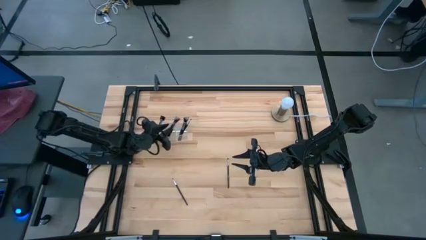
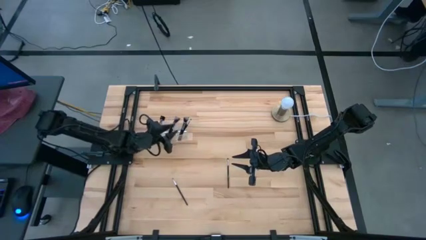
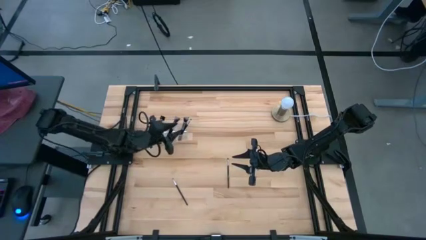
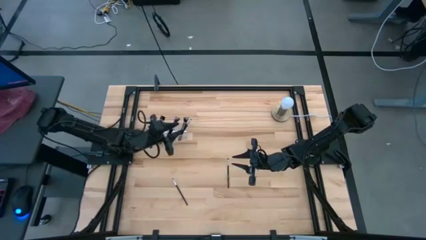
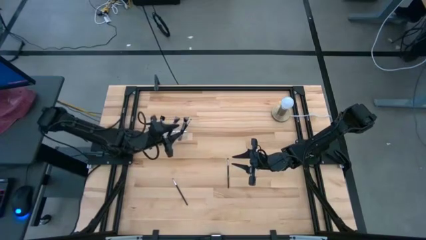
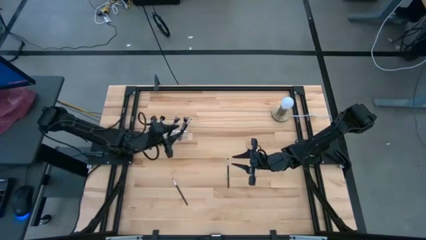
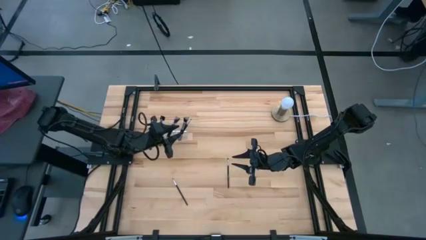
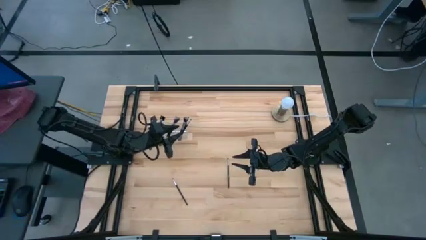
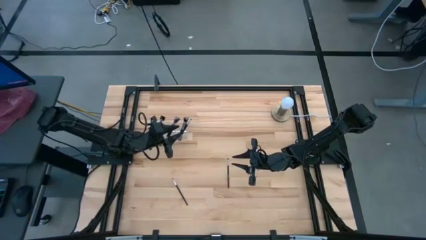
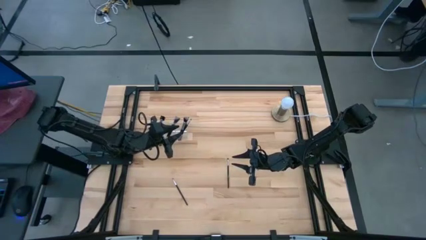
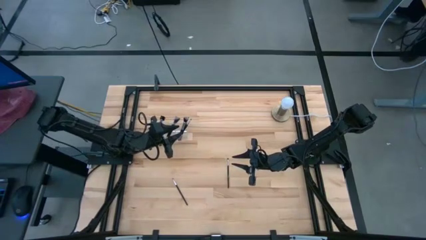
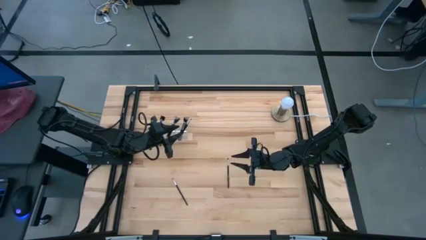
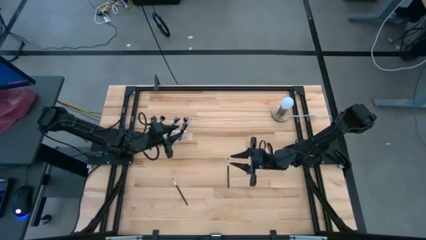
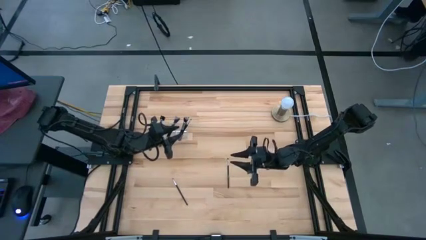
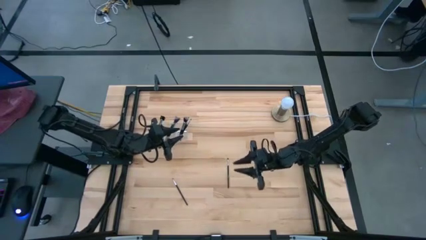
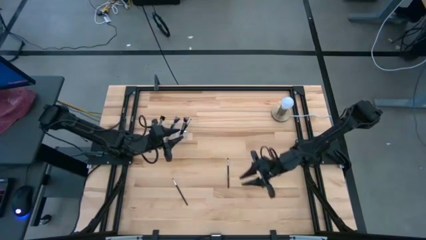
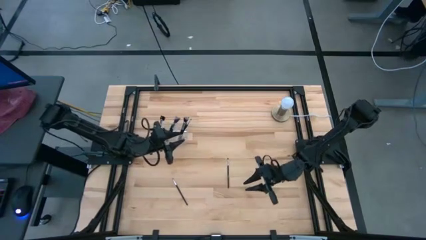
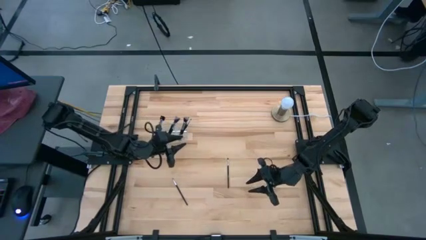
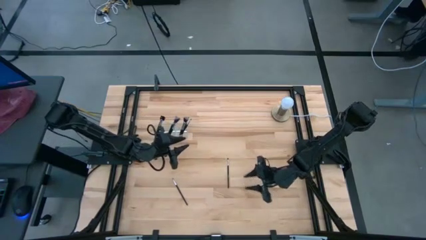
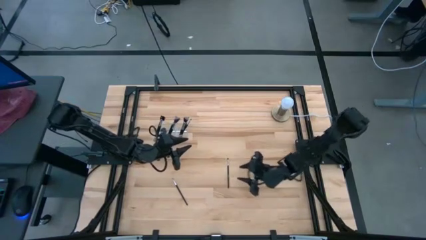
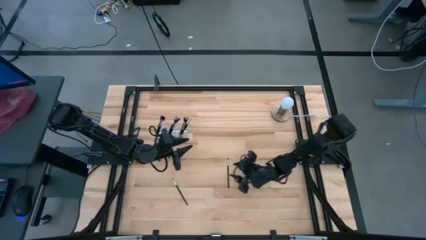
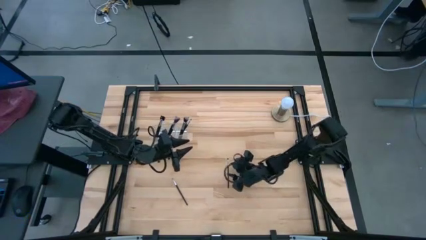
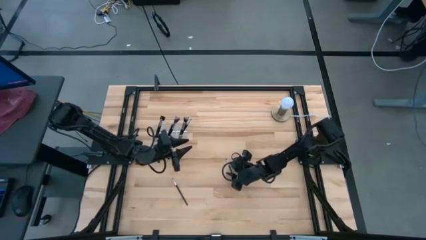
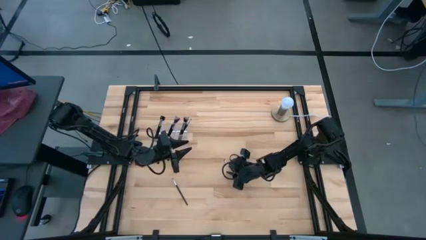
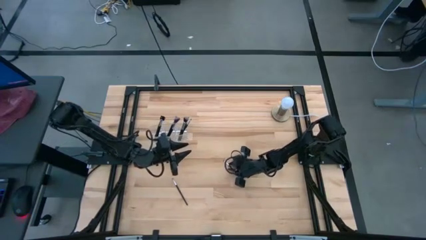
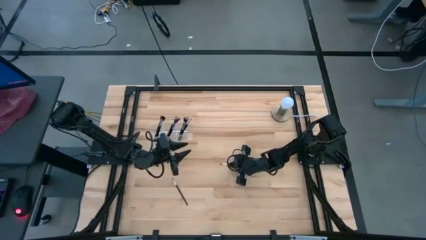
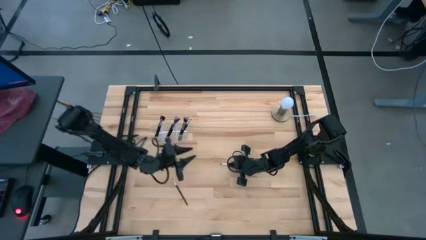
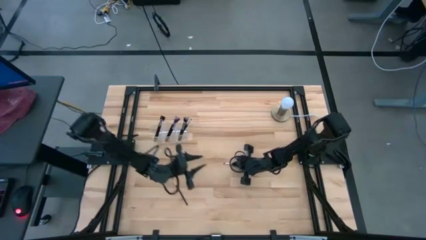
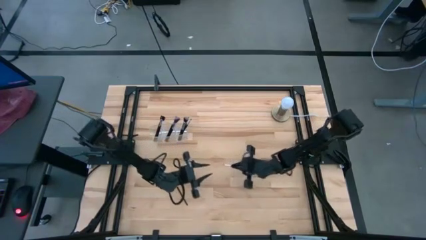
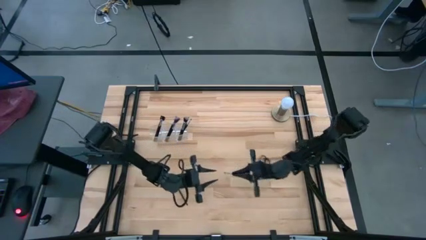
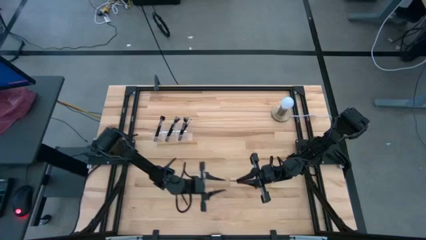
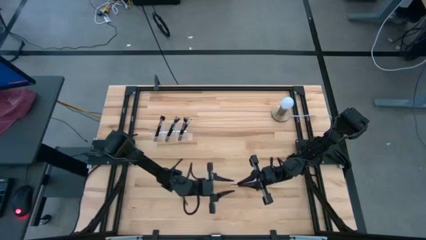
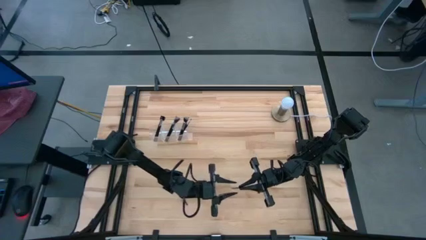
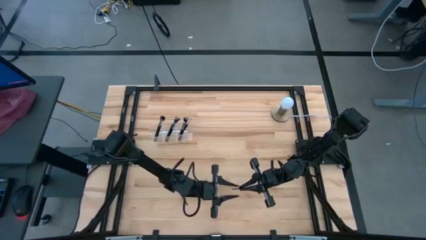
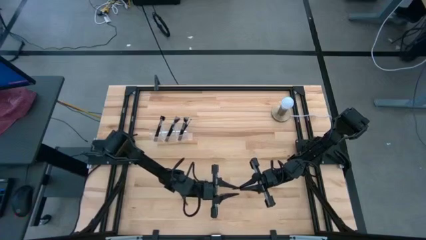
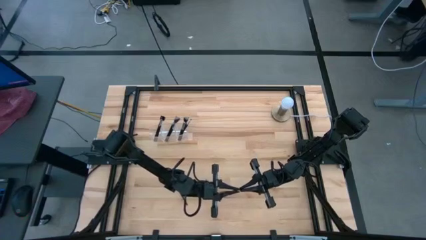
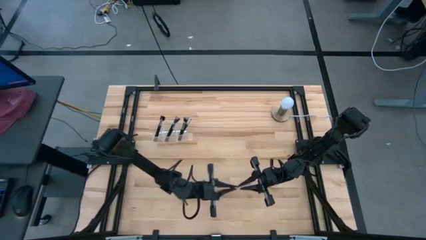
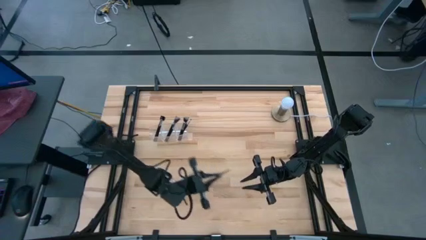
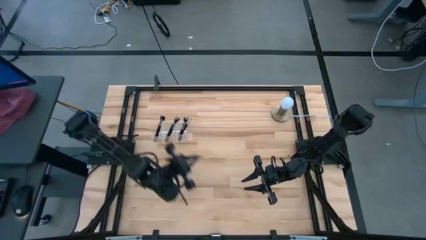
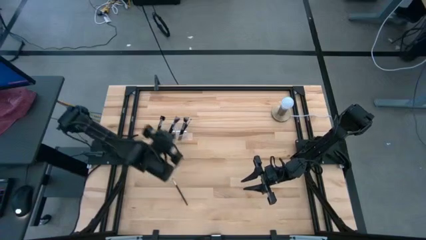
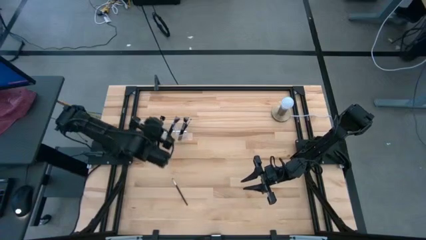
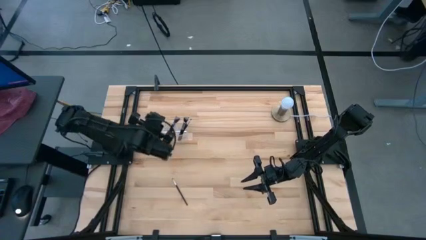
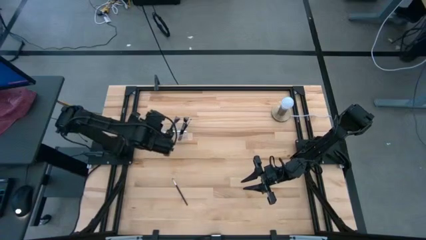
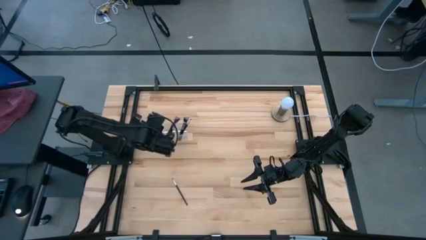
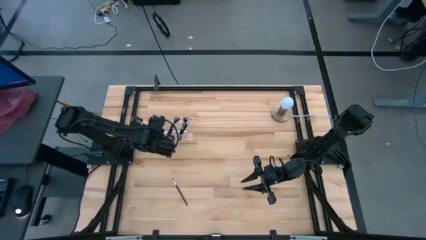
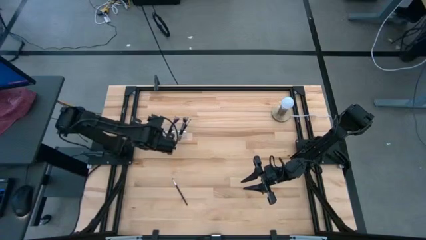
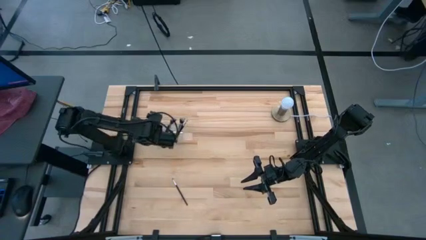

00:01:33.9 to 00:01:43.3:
Task: Pick & Place Makeup Brushes
Put the black eyeshadow brush into the transparent organizer

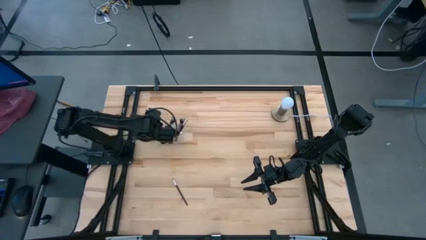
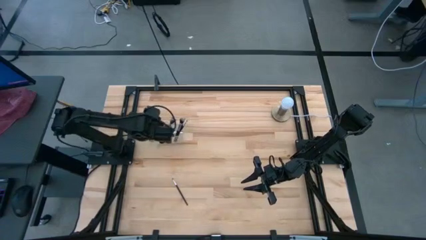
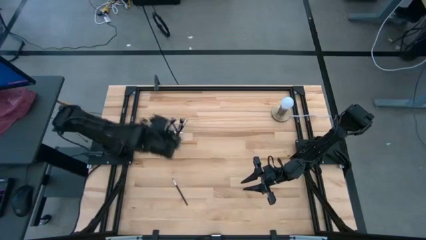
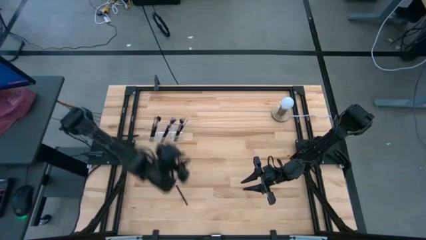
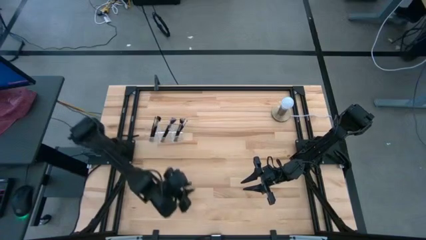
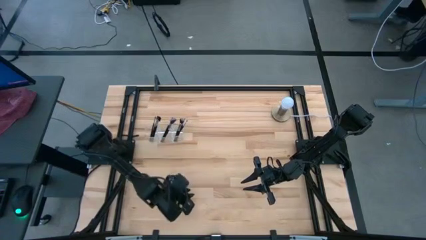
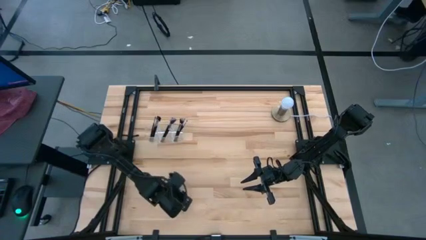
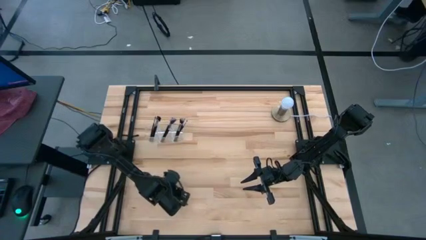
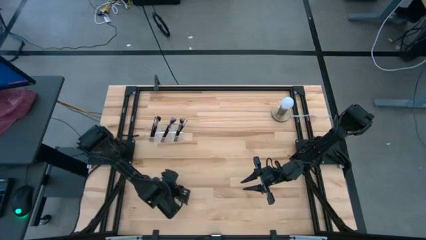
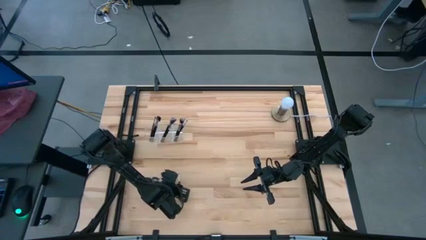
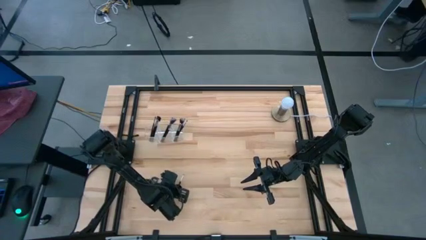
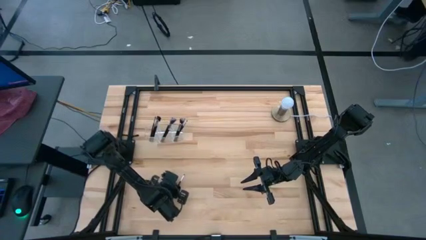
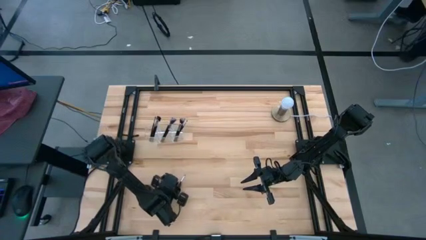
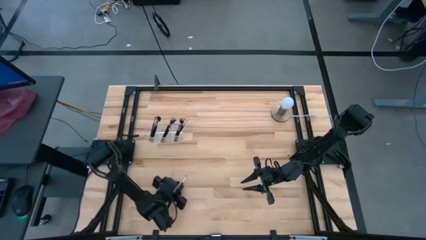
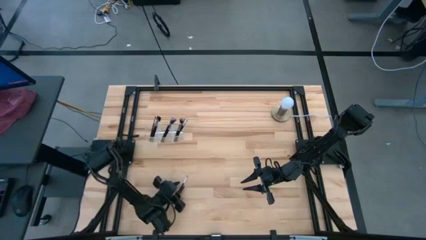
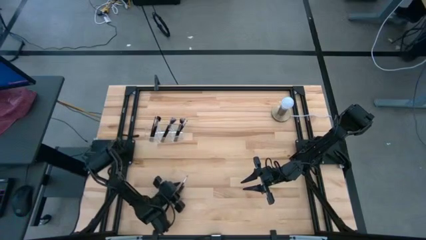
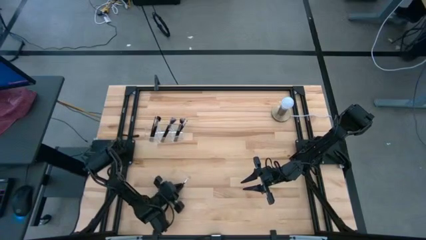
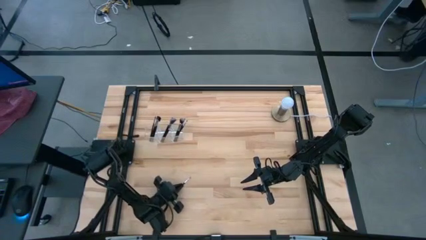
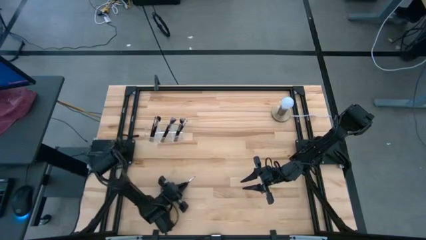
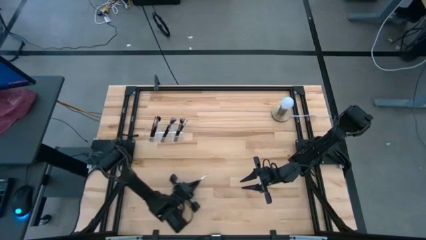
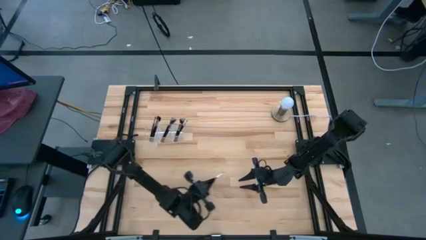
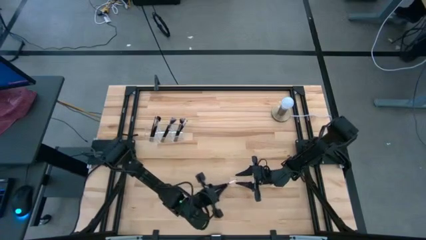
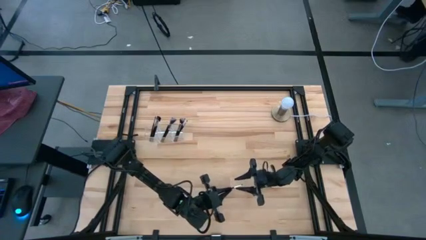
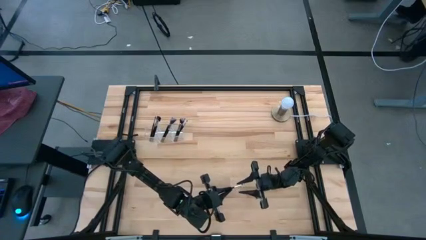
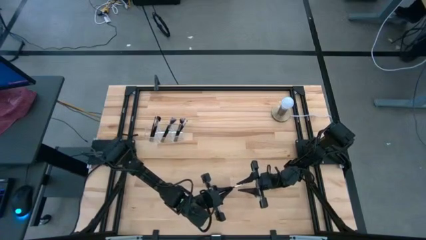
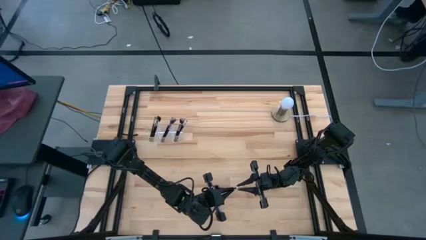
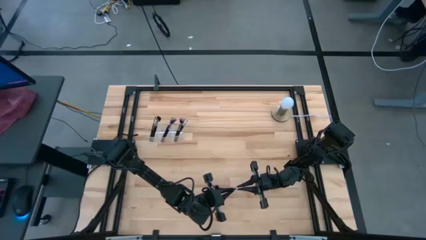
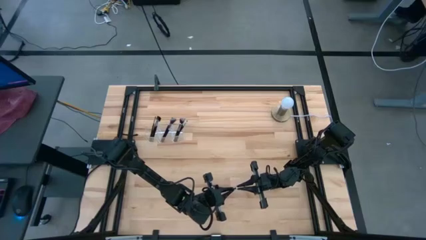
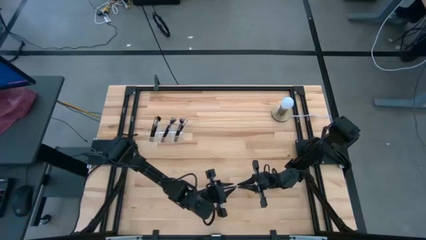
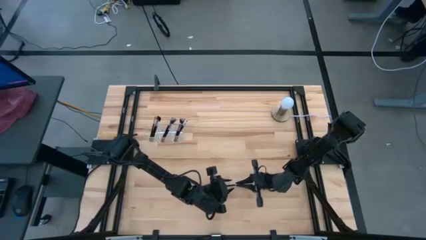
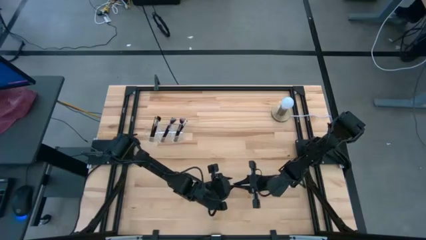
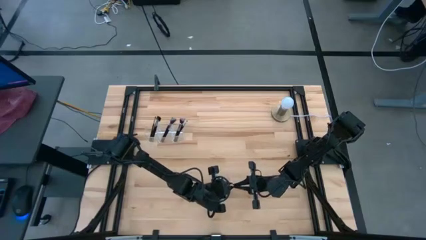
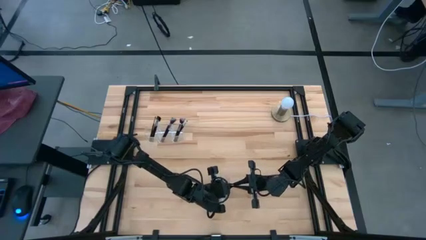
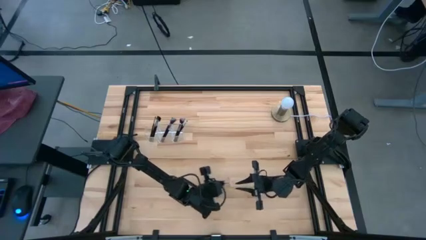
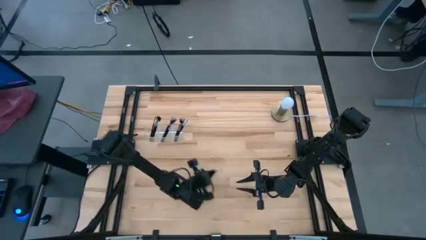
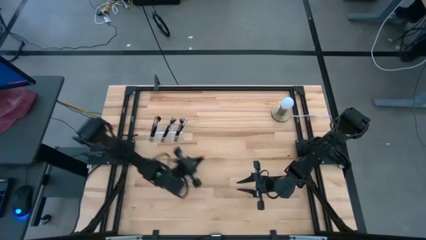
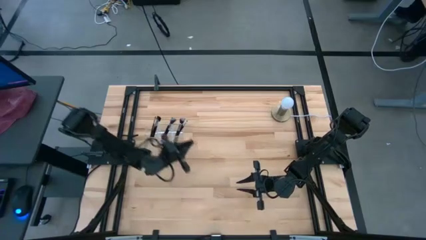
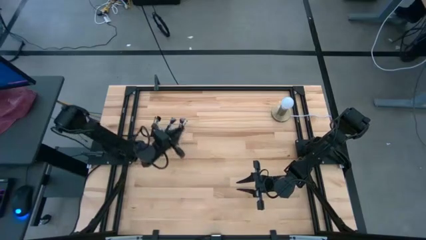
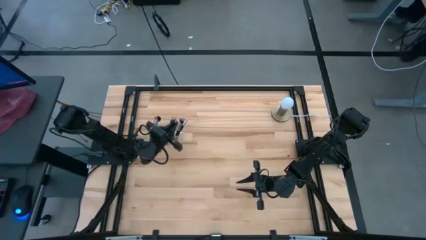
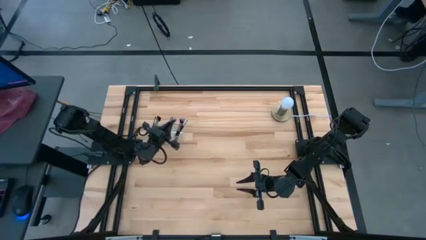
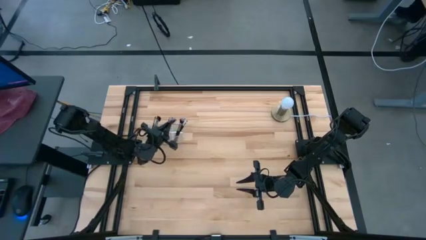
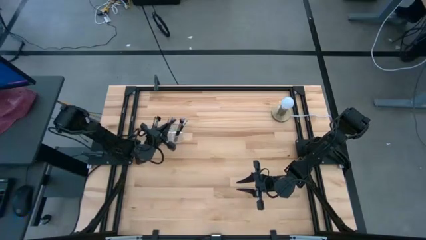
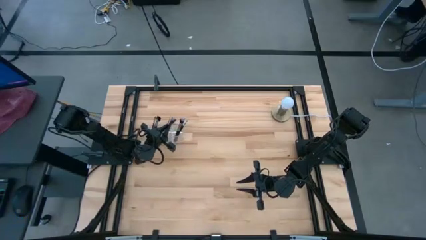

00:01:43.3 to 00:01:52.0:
Put the black eyeshadow brush into the transparent organizer
